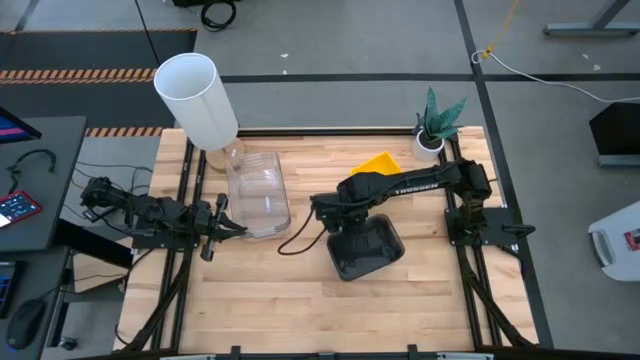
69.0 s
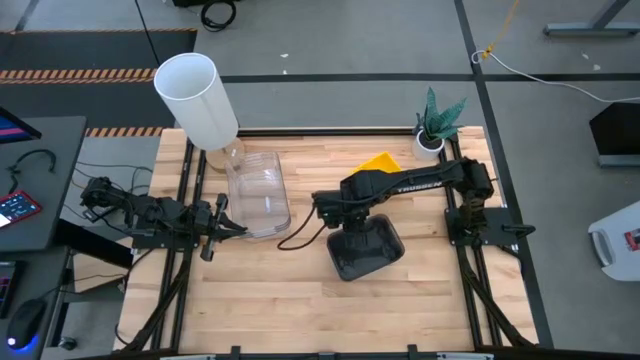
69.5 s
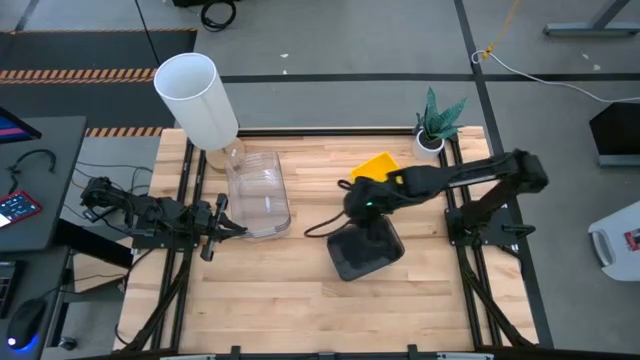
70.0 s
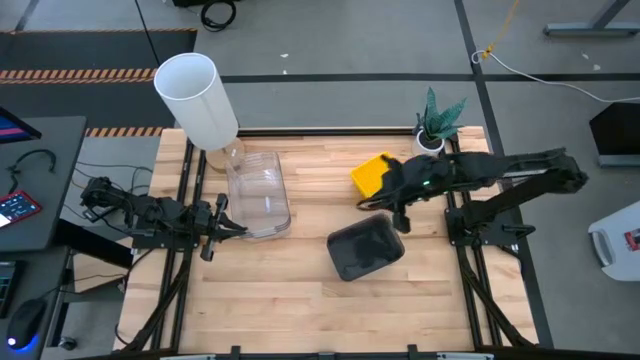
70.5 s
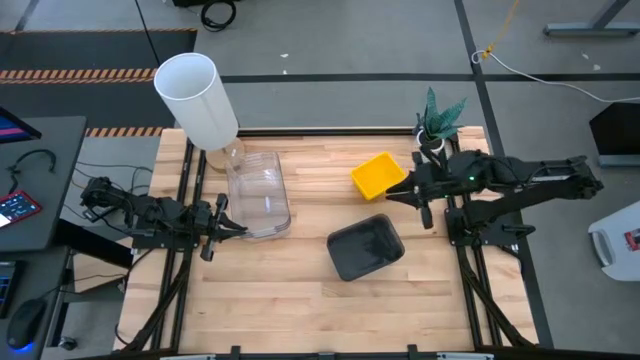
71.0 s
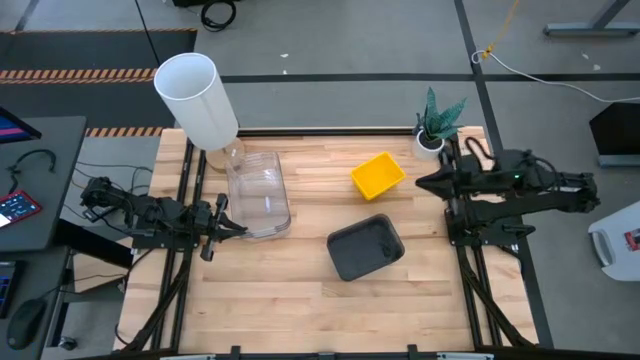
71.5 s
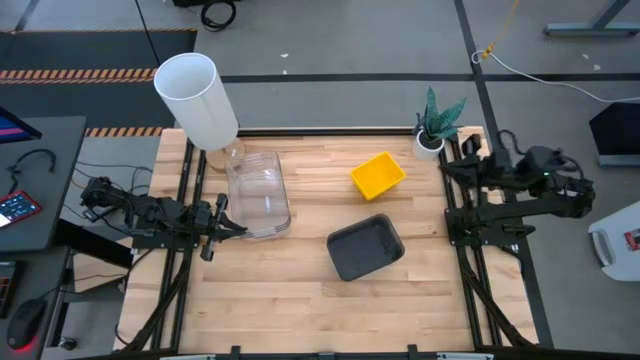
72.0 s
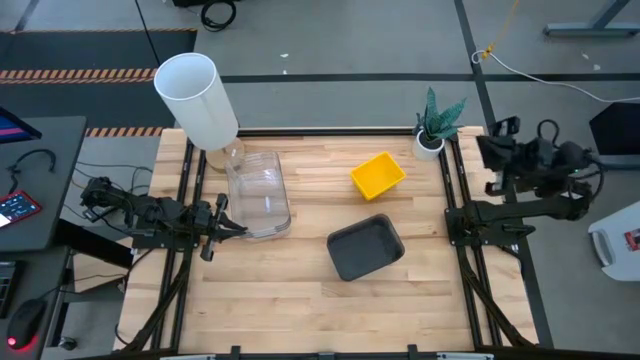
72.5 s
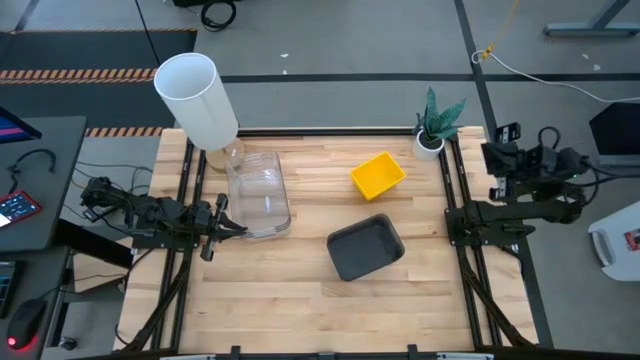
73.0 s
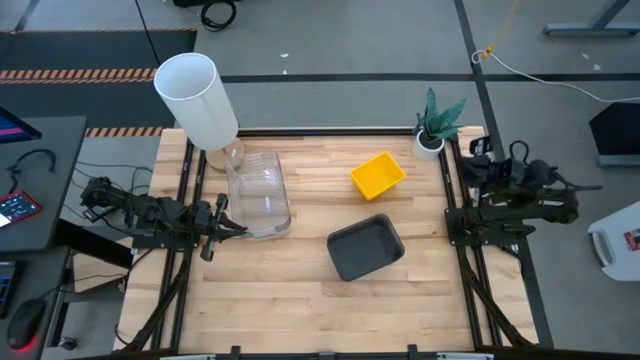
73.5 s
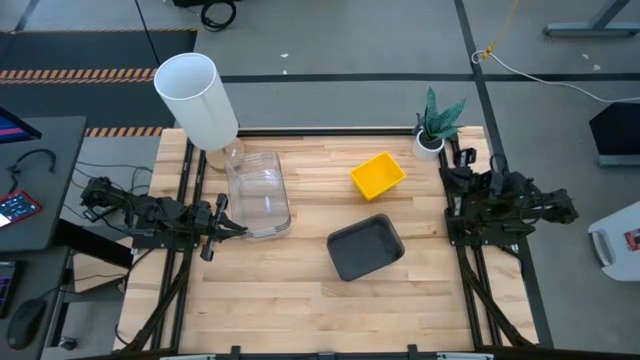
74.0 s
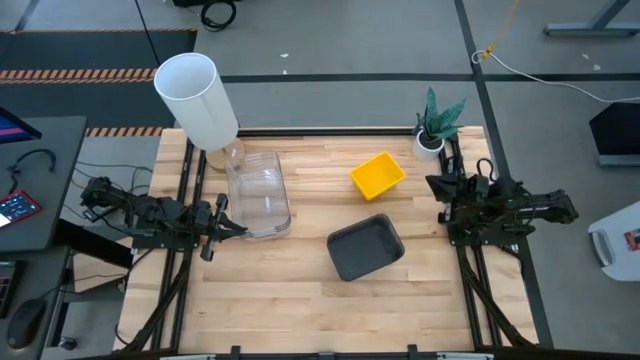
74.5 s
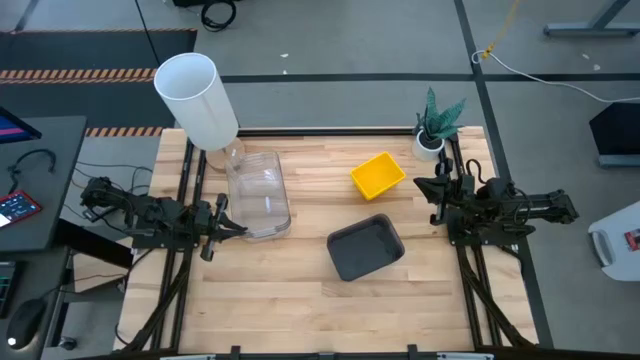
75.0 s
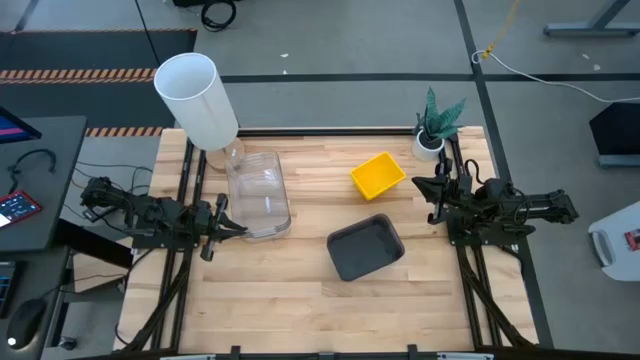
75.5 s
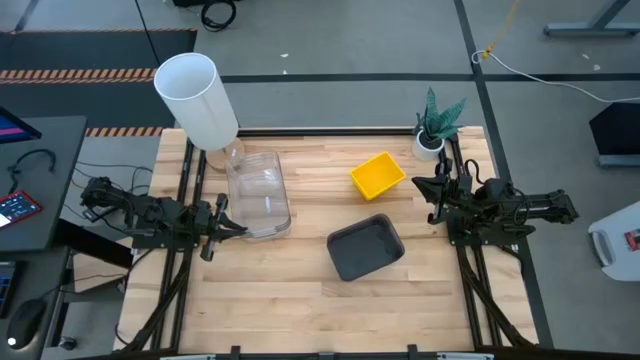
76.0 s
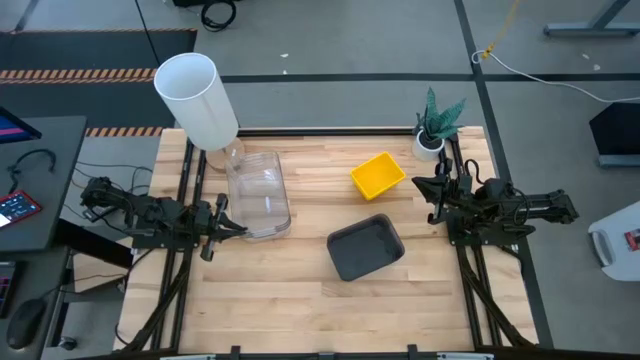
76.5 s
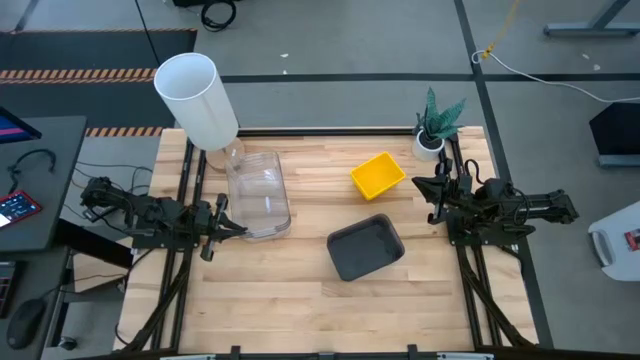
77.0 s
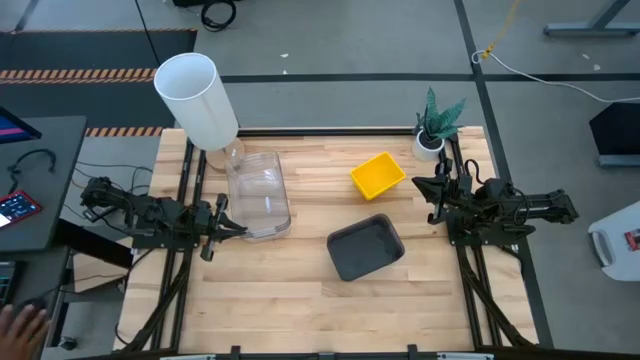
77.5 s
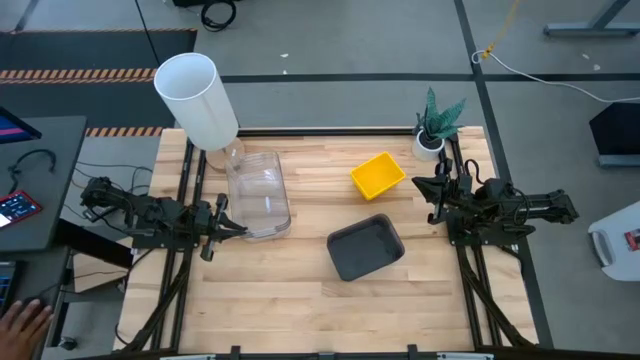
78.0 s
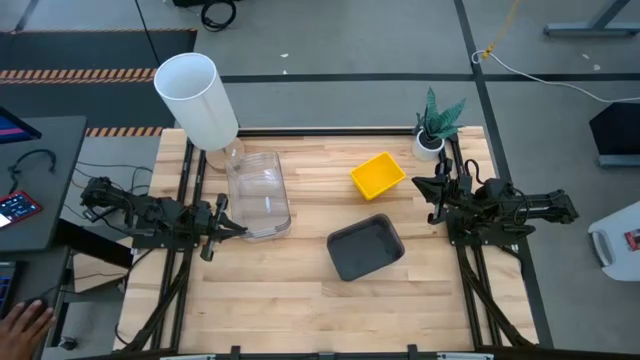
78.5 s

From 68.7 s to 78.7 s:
Return to Home Position
